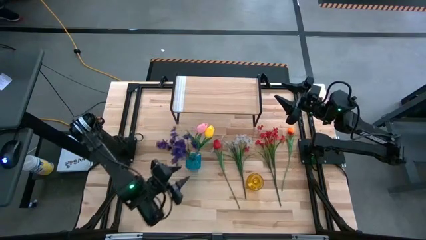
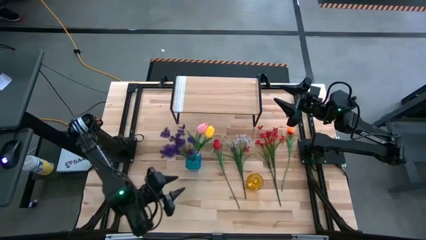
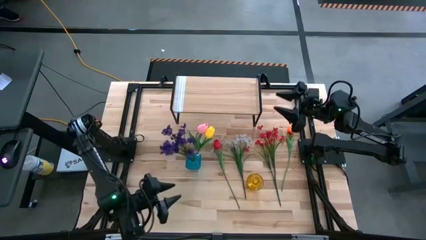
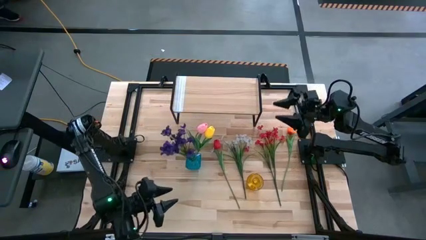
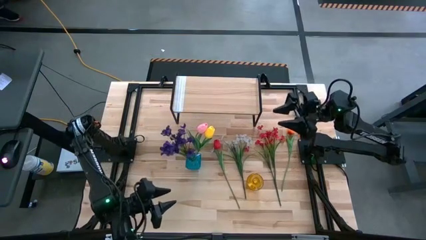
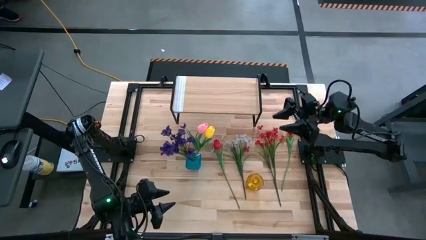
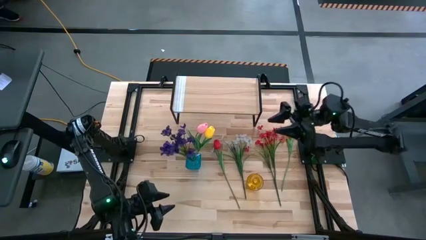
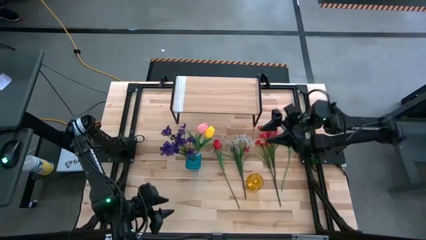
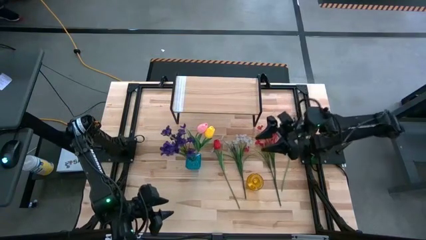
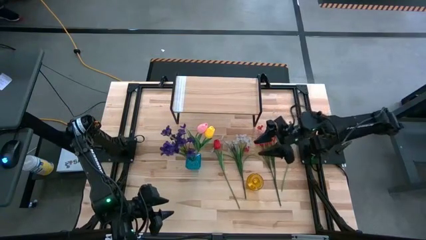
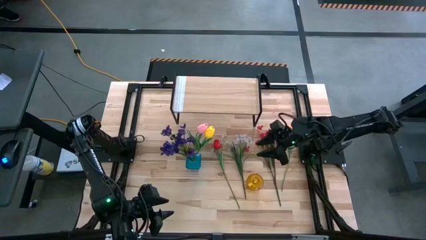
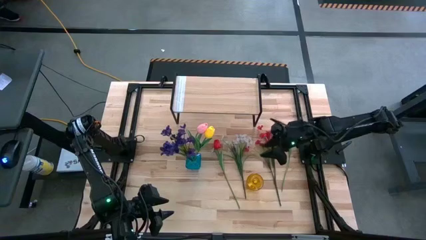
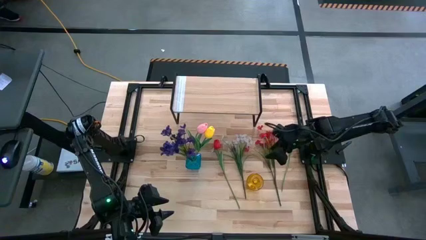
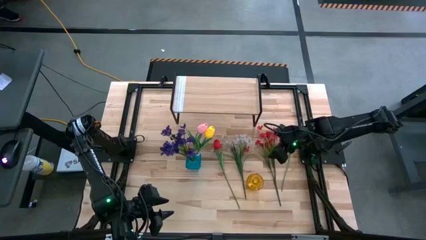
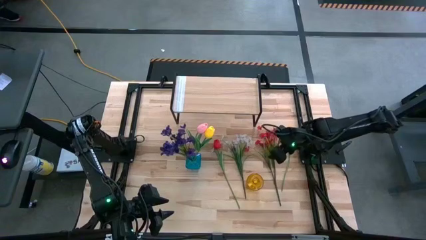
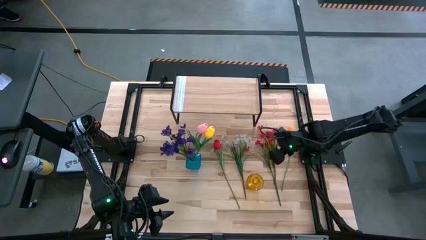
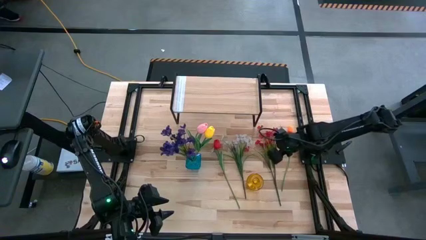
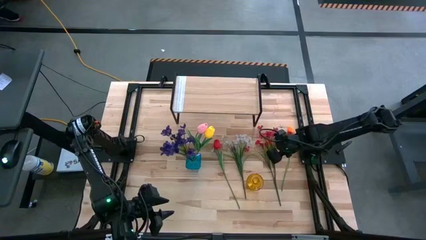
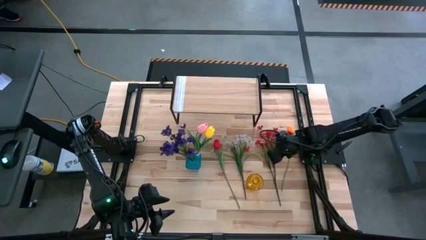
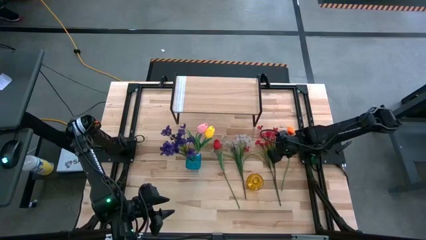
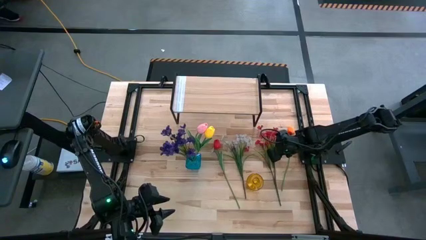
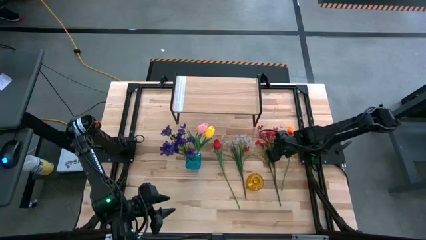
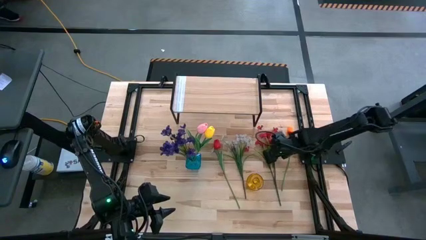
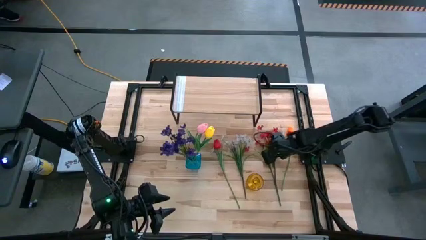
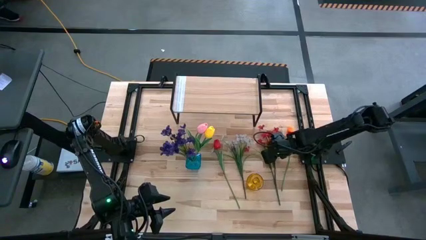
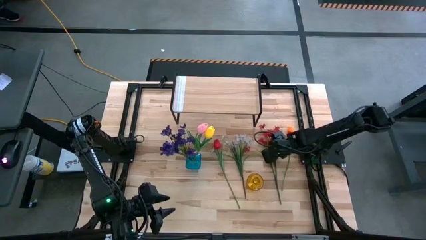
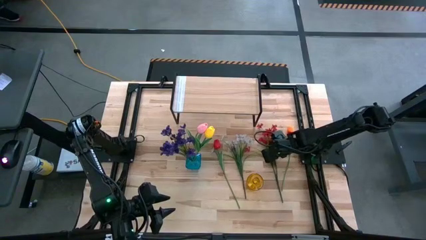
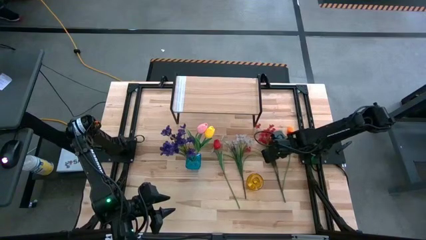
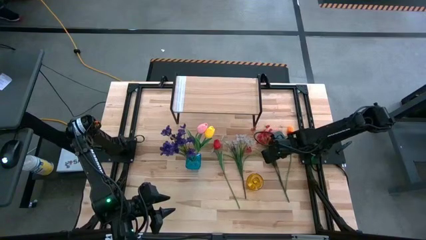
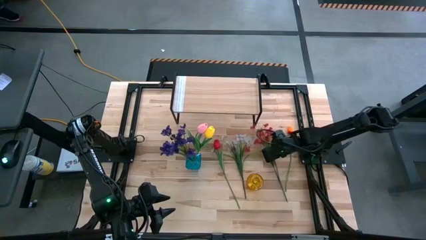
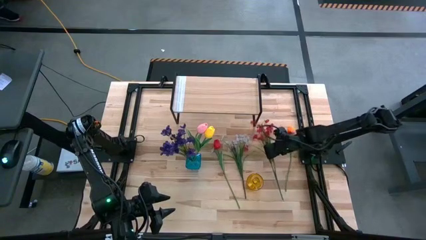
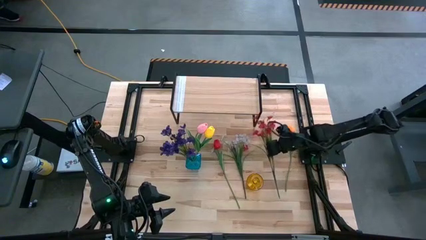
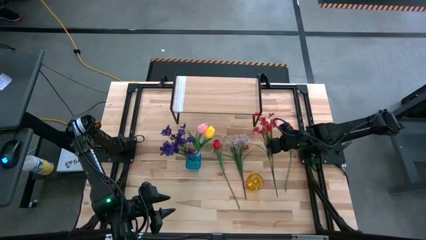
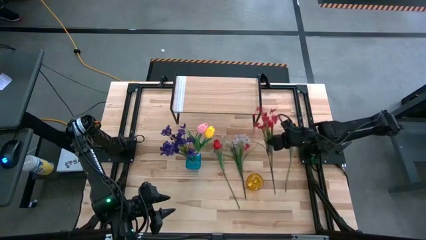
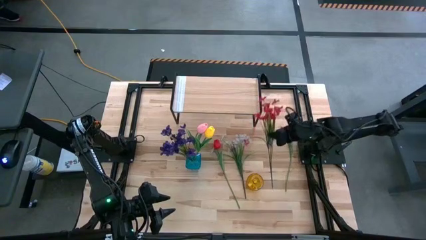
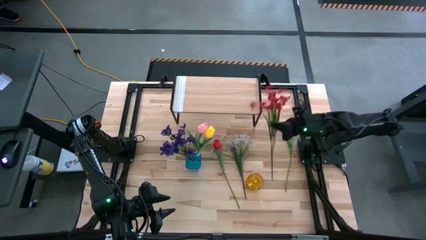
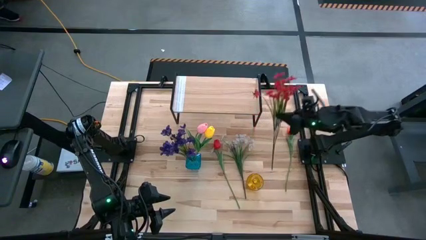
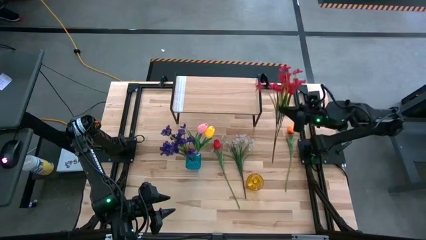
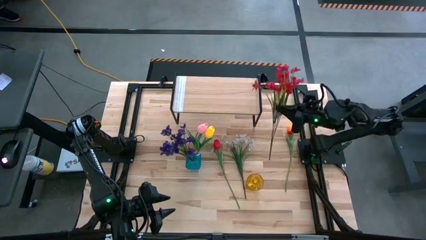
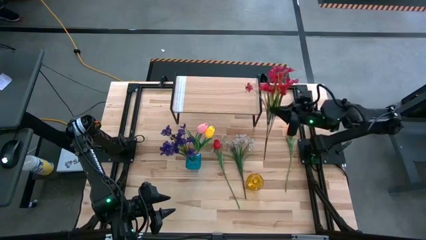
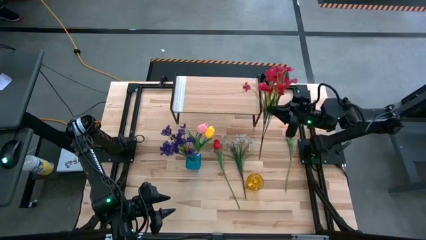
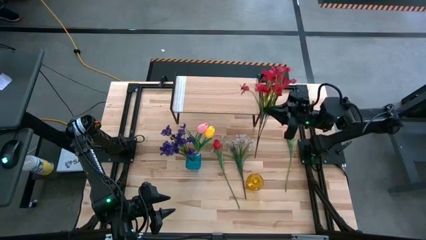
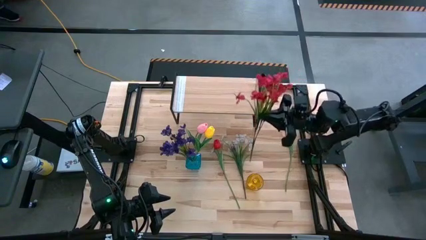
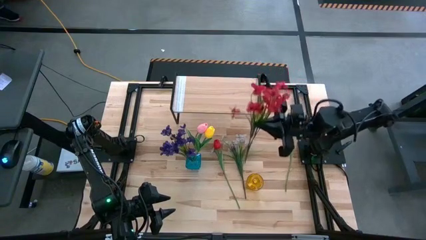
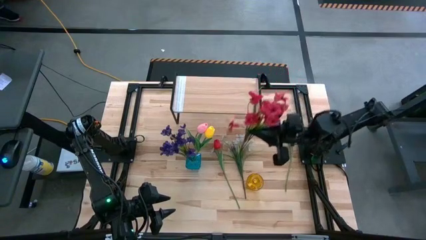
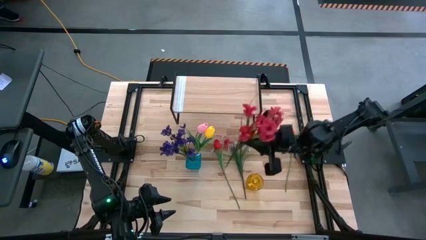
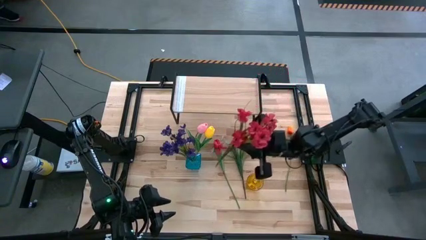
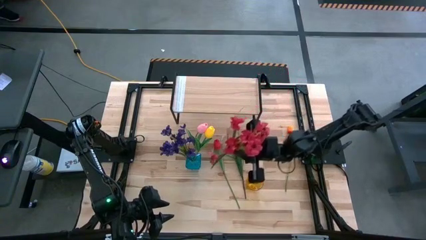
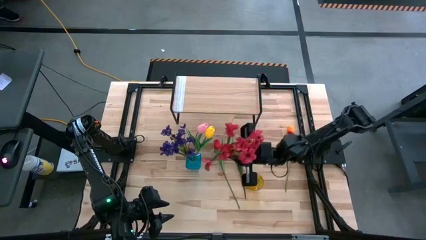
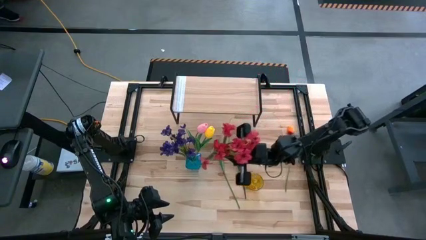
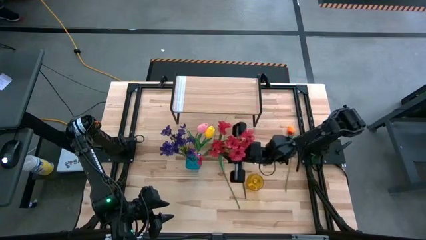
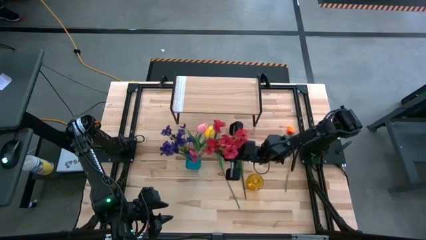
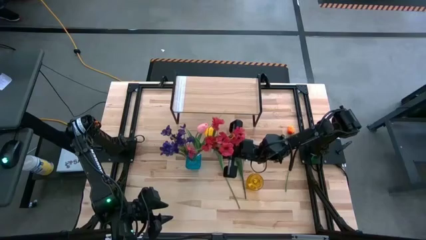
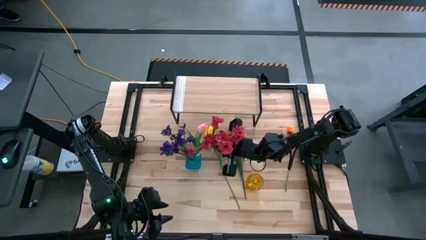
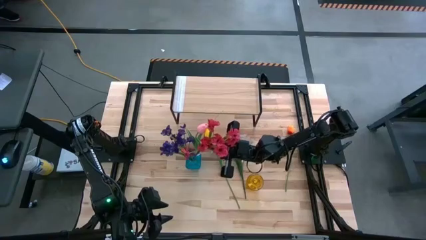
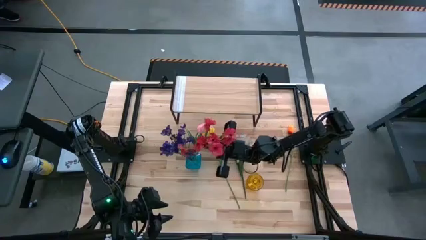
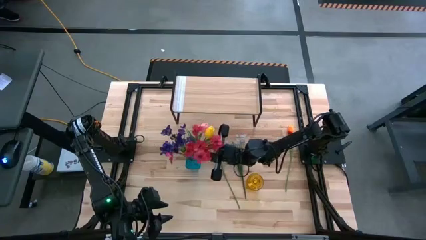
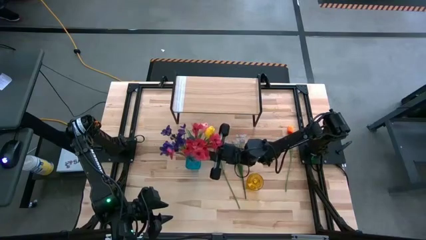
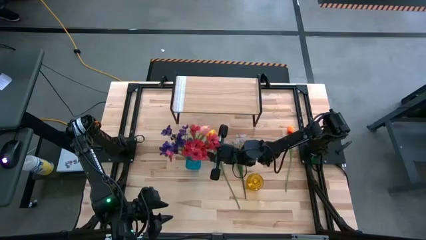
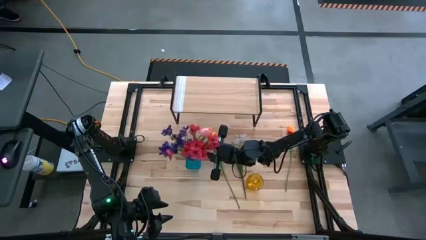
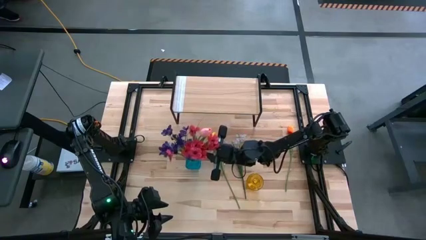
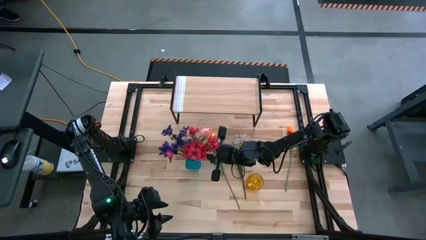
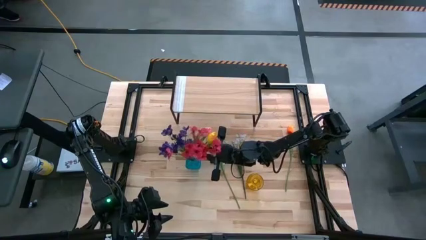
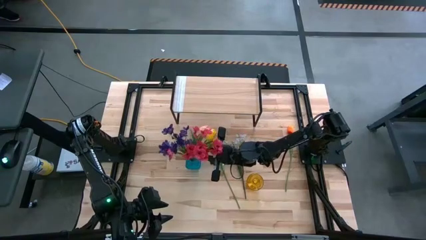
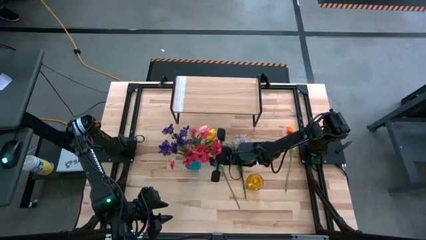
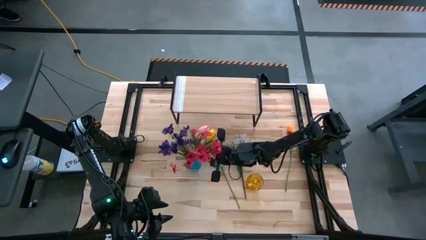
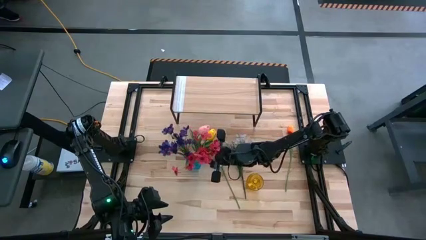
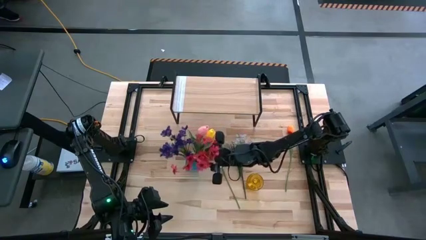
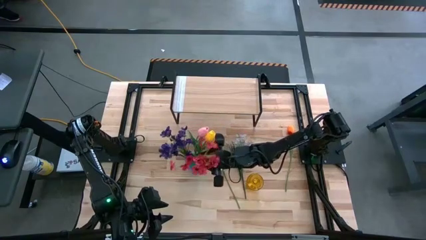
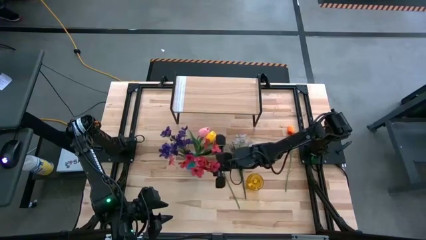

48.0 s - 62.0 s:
Task: Pick and place flowers into a vace then onto a shelf
Put the red flowers into the blue vase
